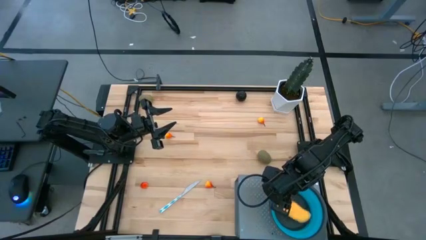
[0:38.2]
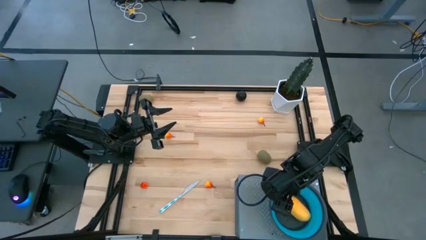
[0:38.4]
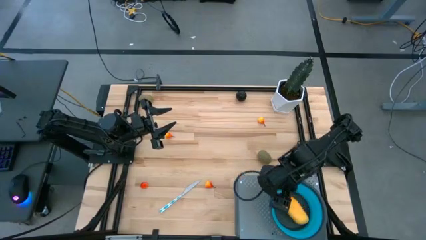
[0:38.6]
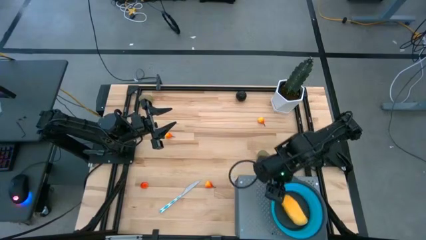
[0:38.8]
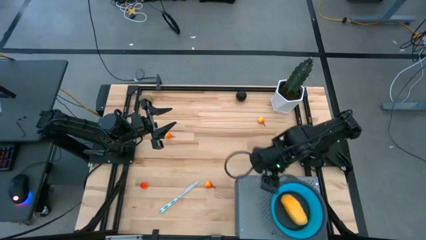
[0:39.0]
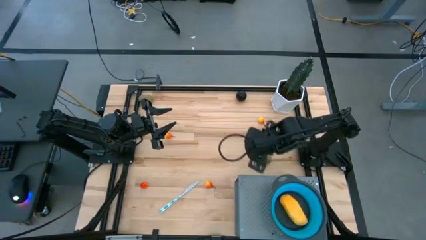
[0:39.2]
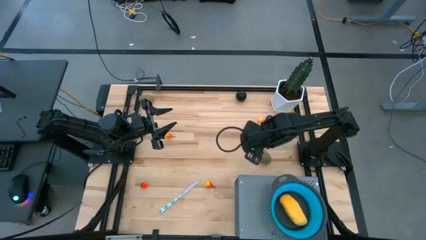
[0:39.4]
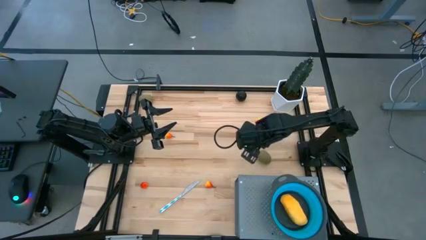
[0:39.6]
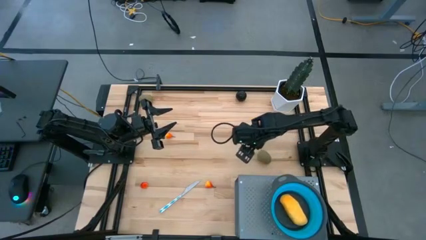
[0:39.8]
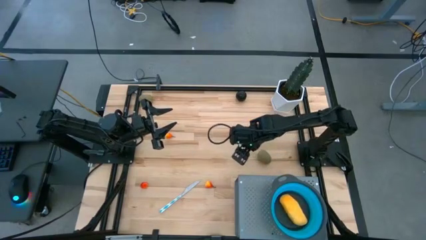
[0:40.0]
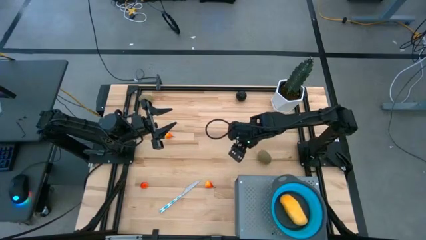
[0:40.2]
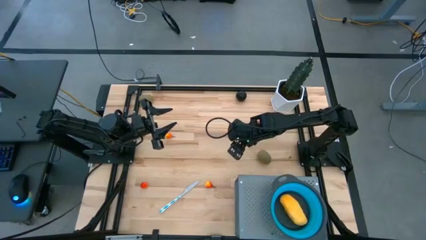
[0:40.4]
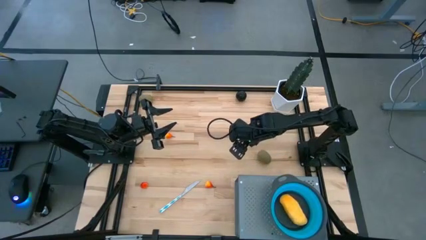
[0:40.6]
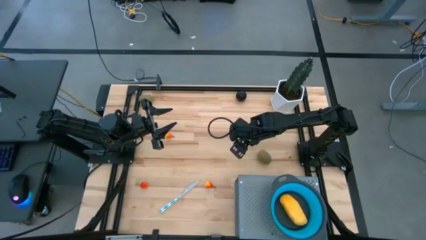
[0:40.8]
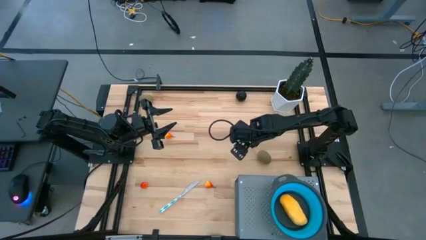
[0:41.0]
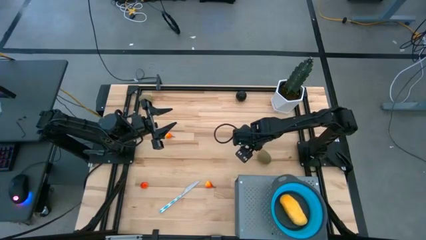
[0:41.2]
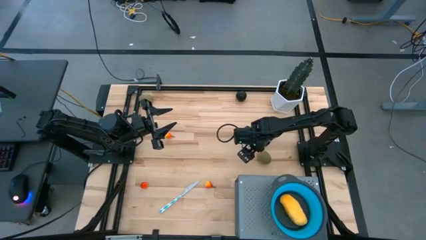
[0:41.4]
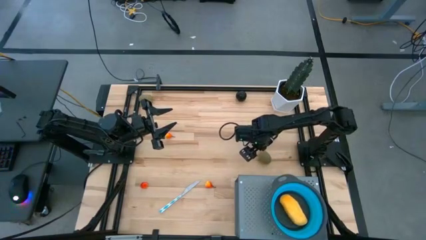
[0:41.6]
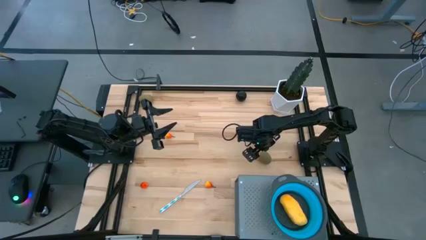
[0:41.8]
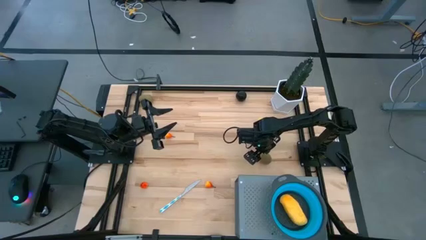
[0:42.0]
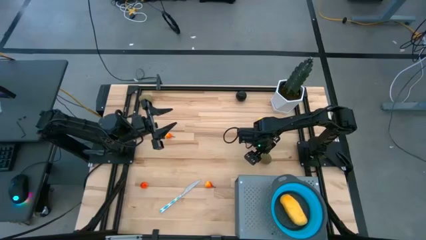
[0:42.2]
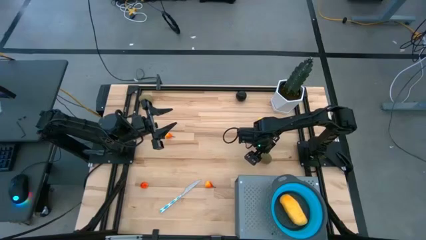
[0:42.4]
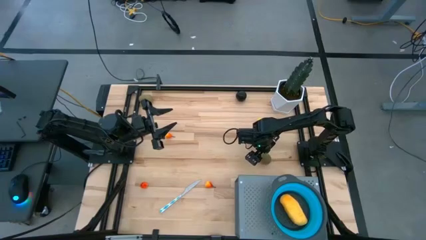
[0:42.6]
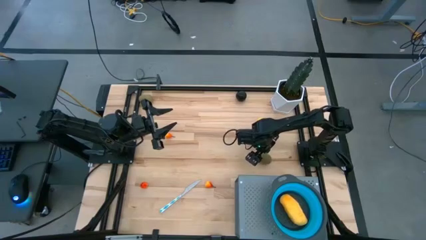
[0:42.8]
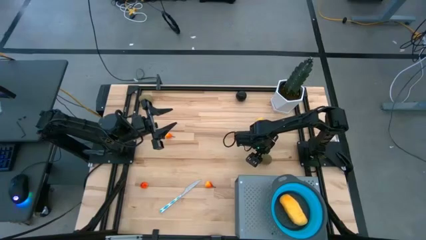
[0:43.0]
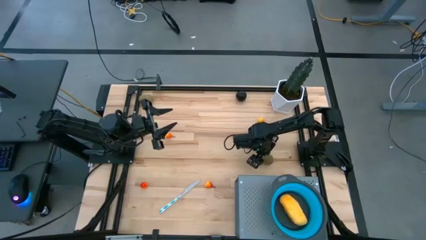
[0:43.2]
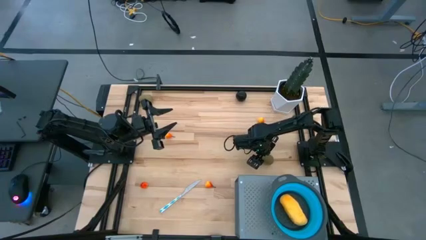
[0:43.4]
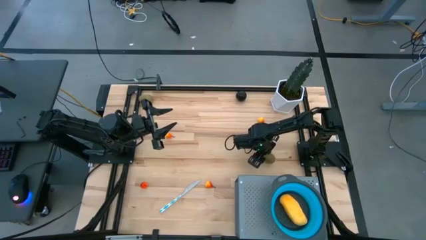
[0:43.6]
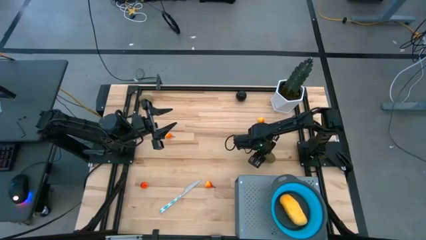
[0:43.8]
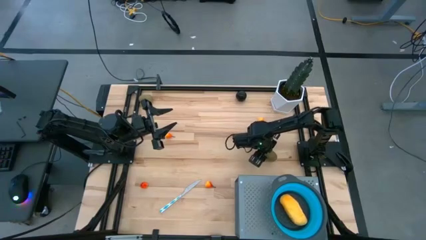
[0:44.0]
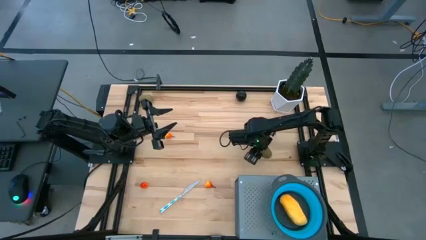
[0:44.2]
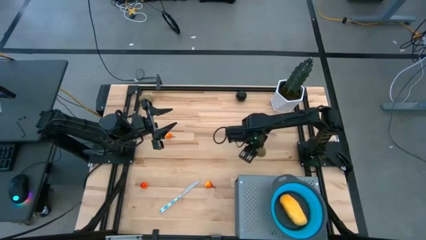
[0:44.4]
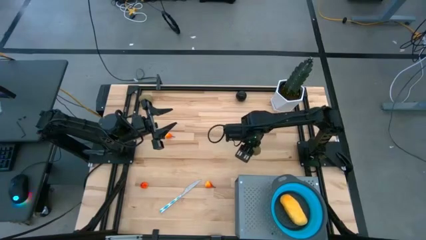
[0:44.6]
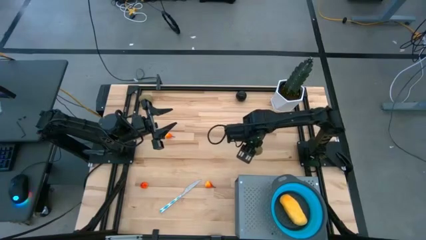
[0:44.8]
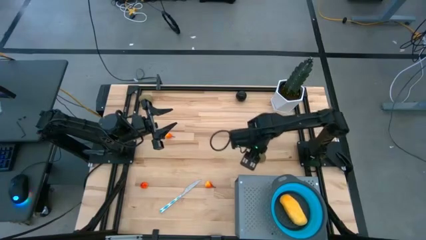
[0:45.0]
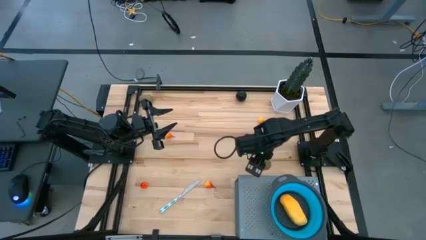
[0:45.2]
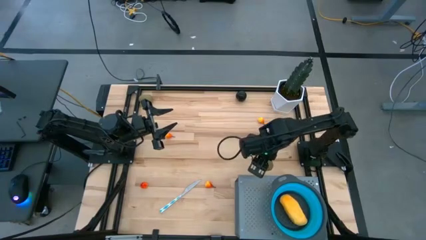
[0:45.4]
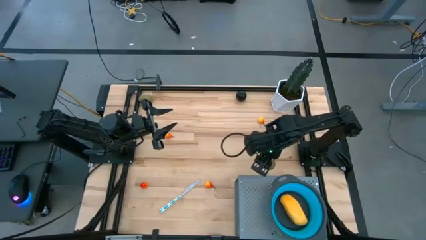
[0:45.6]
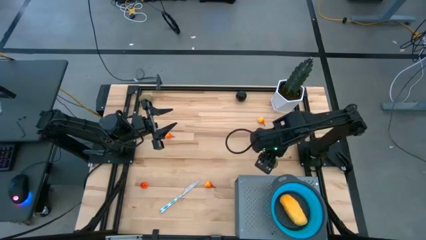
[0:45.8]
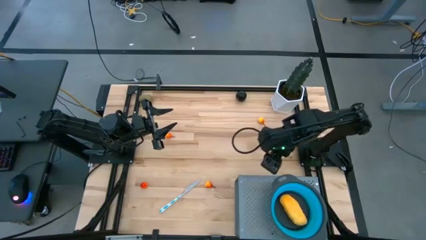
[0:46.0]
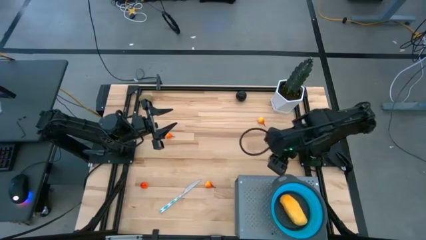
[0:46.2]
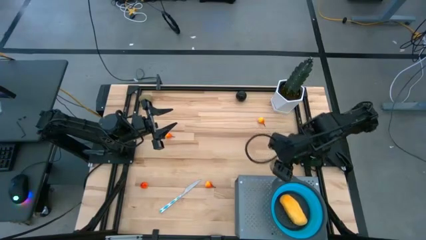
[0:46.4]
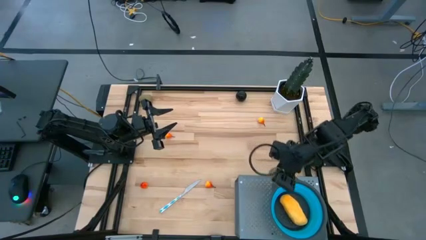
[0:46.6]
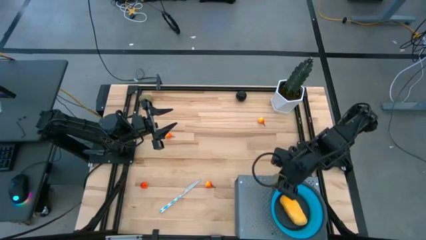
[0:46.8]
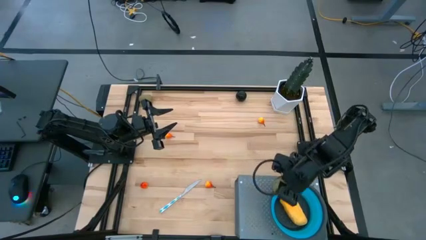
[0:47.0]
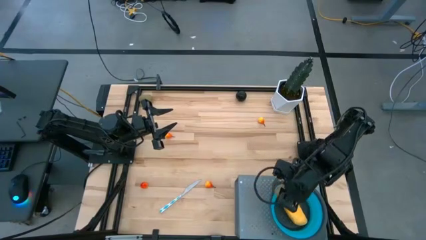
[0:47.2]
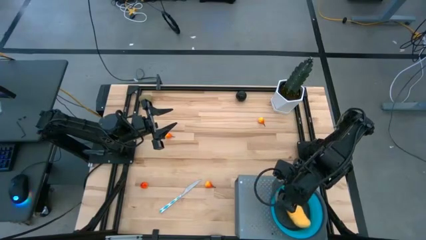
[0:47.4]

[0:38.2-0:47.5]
Task: Pick & Place Fruit
Put the bottom brown kiwi into the blue strainer bowl on the shelf

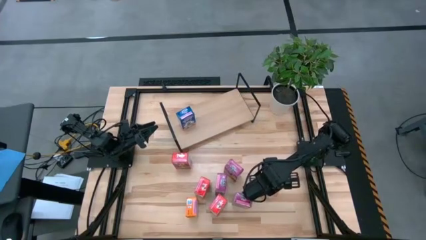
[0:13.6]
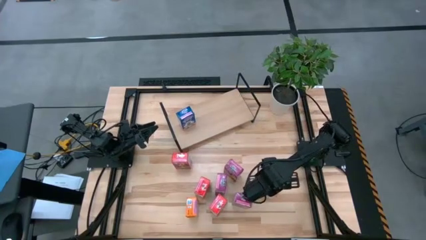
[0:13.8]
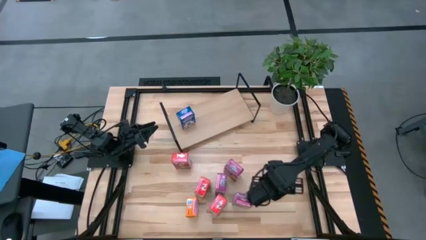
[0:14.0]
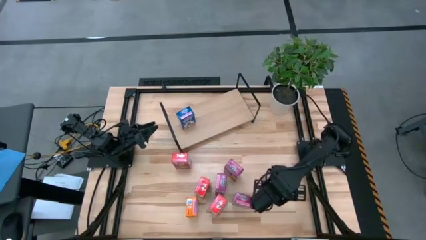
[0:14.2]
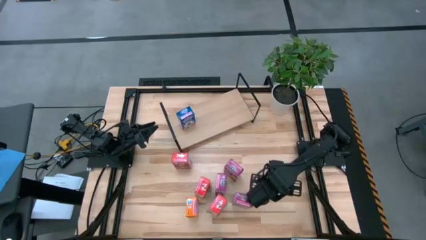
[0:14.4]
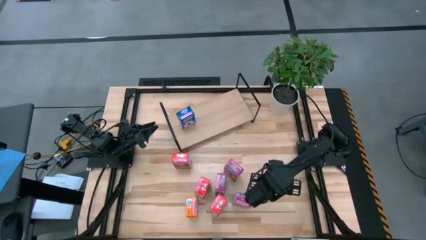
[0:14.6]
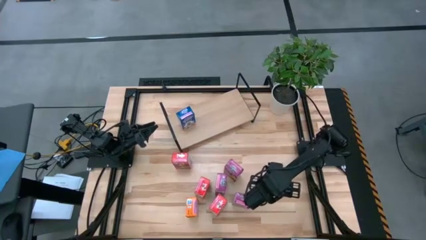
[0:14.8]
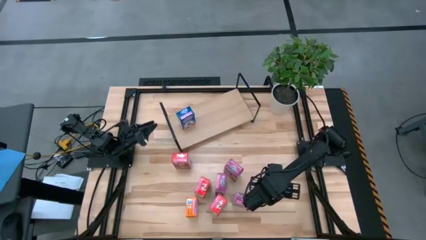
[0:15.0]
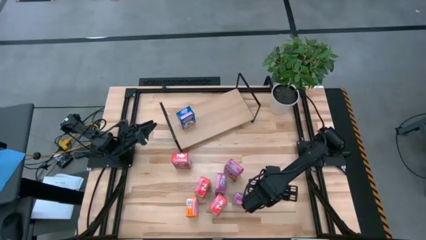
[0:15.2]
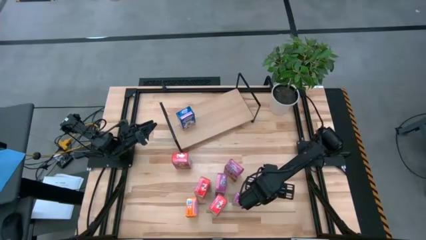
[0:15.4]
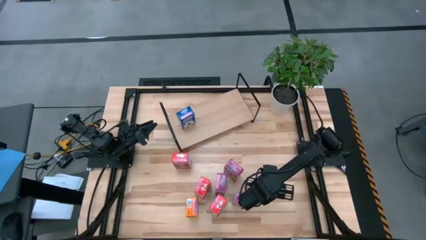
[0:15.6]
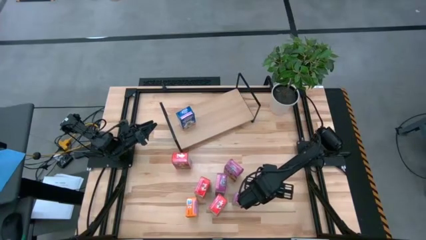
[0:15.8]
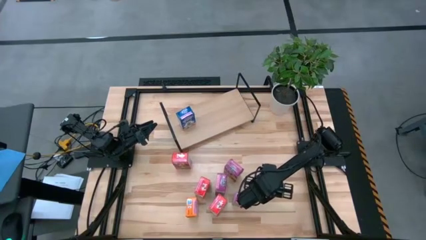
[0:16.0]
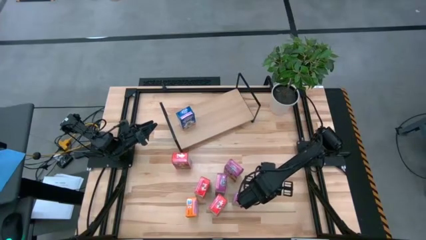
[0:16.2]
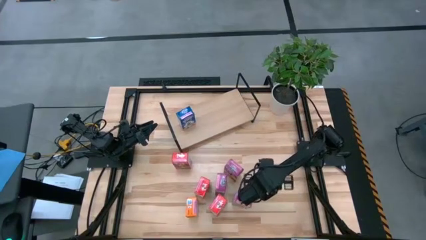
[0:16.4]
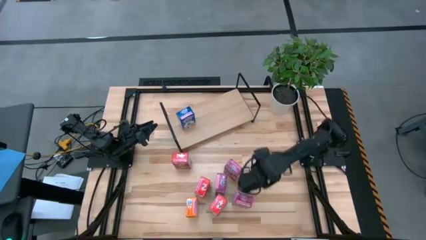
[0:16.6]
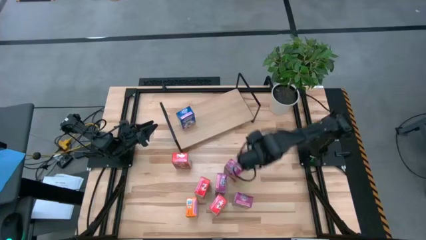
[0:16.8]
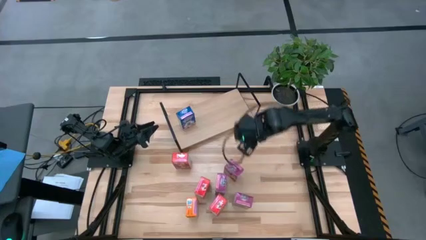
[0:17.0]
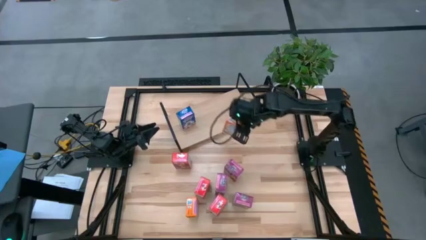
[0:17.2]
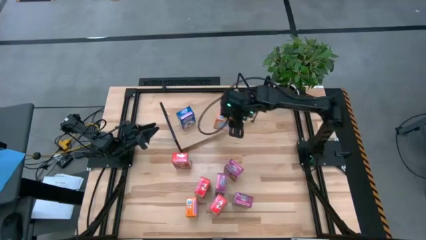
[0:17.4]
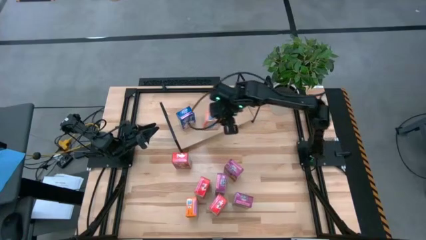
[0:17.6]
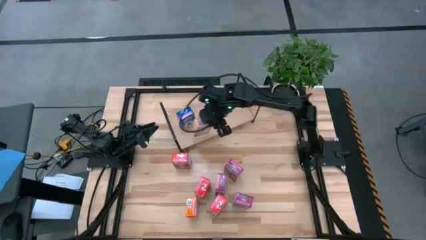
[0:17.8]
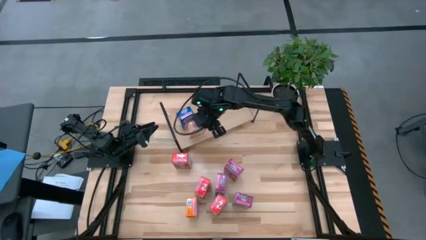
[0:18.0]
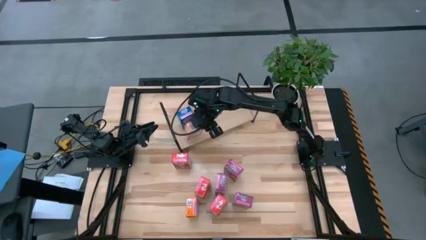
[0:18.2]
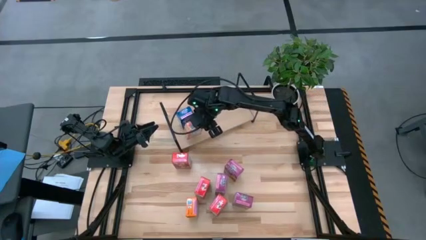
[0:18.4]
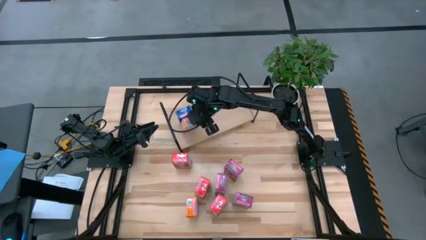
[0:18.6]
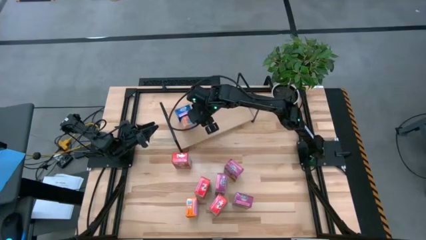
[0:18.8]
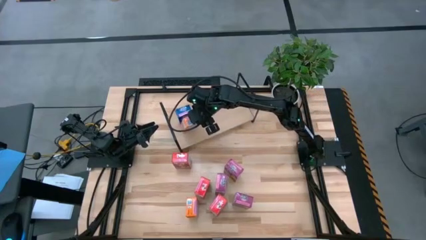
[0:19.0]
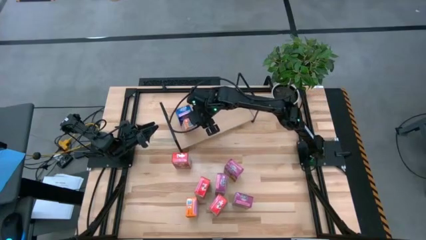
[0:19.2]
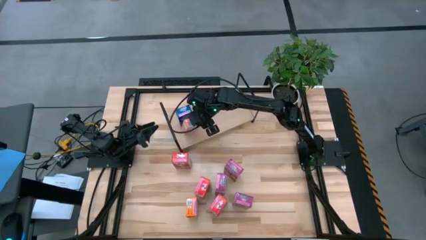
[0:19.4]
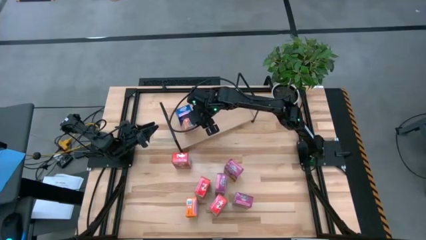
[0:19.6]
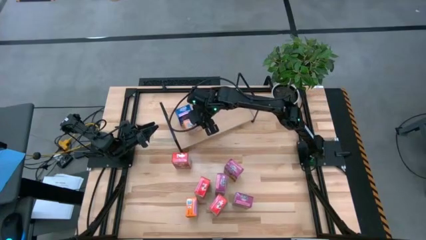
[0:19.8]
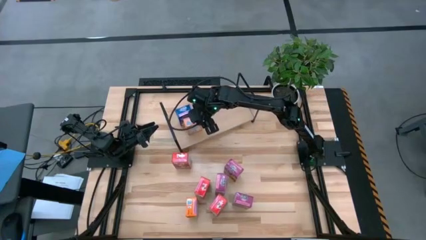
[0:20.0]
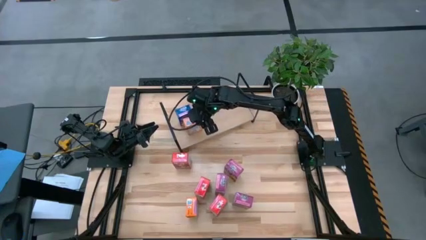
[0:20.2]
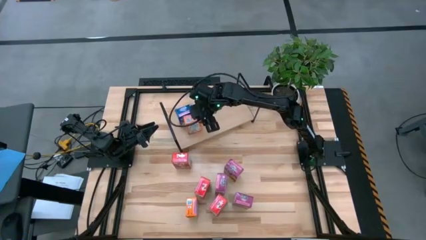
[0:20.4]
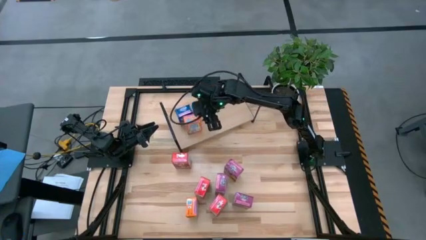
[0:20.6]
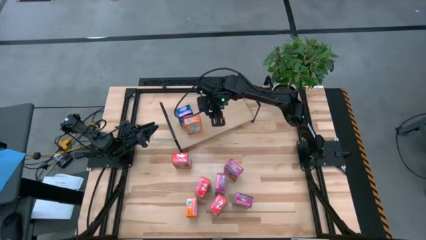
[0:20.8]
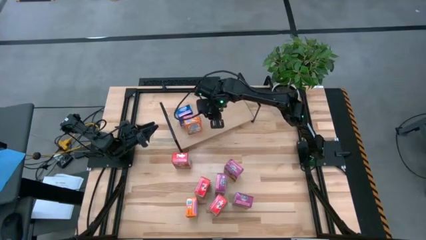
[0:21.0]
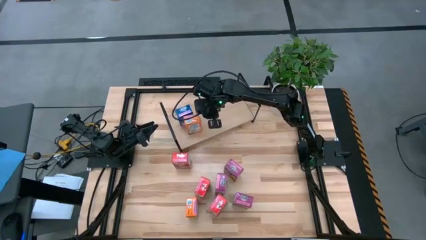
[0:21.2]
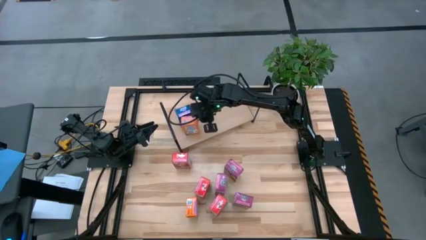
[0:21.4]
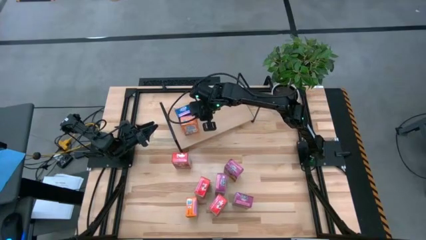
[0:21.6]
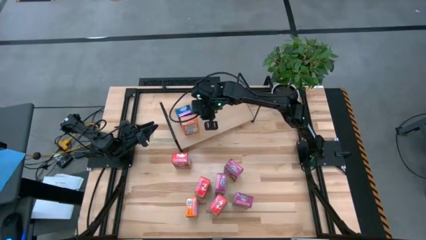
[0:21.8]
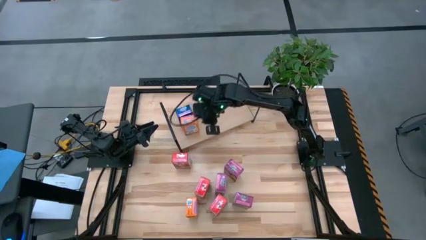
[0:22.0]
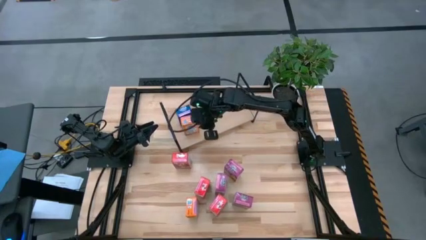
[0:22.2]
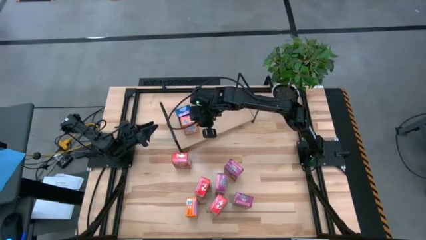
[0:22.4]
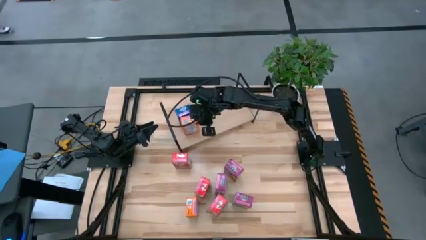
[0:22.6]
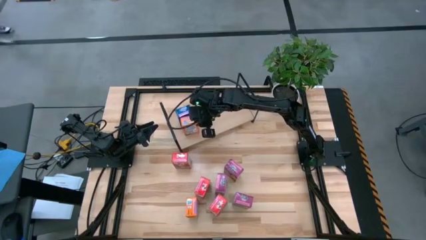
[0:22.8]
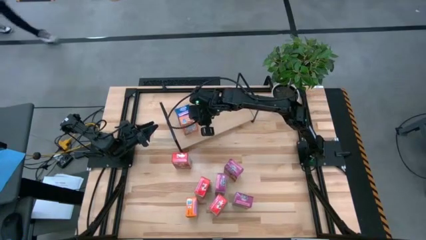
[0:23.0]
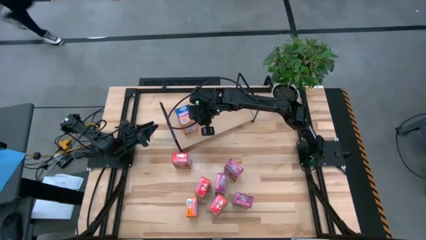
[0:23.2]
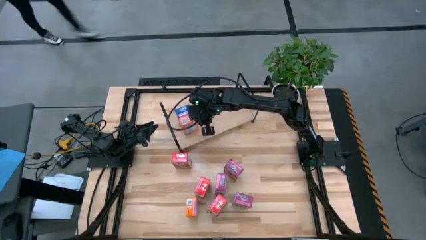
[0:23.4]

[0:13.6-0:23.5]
Task: Stack cereal on shelf
Put the right orange cereal box on the shelf
